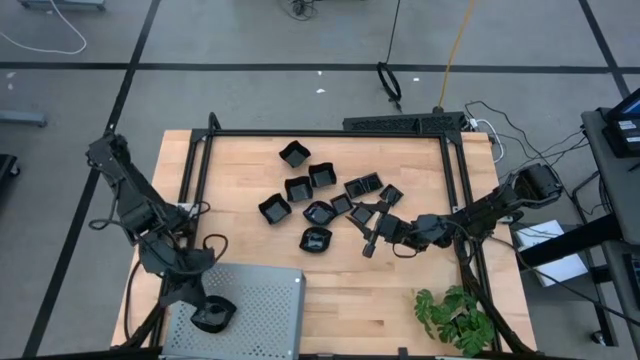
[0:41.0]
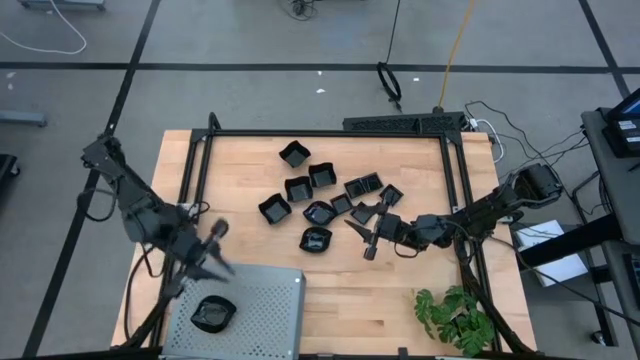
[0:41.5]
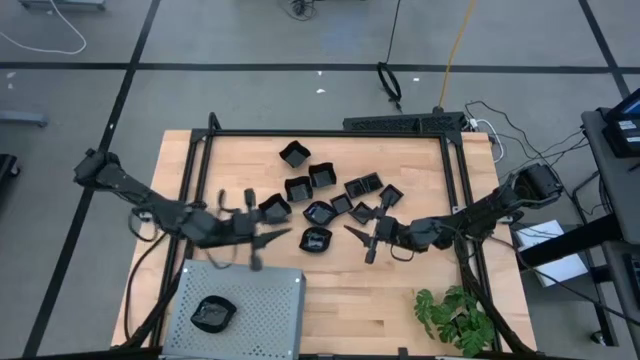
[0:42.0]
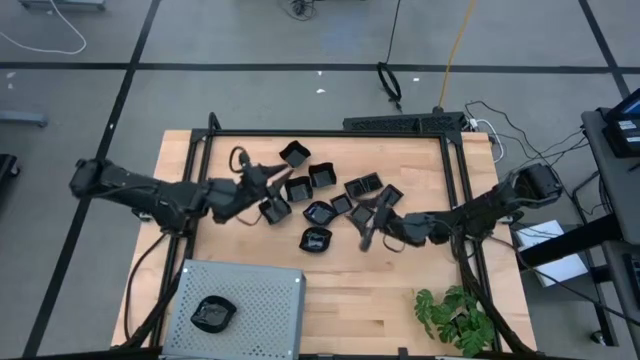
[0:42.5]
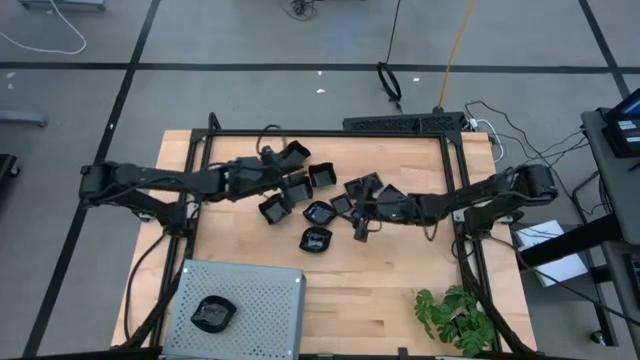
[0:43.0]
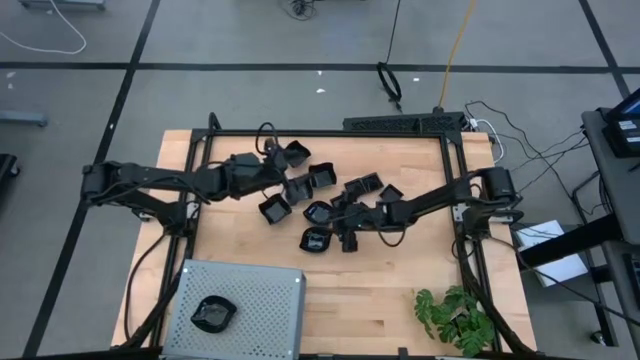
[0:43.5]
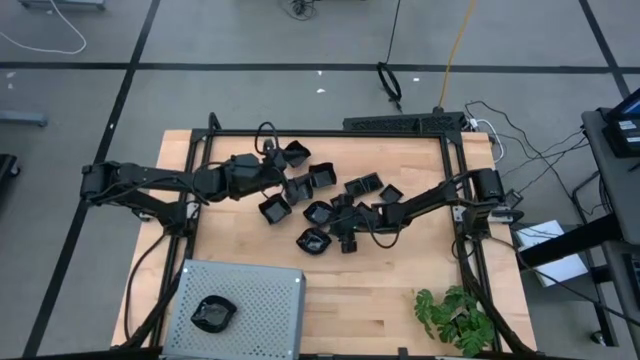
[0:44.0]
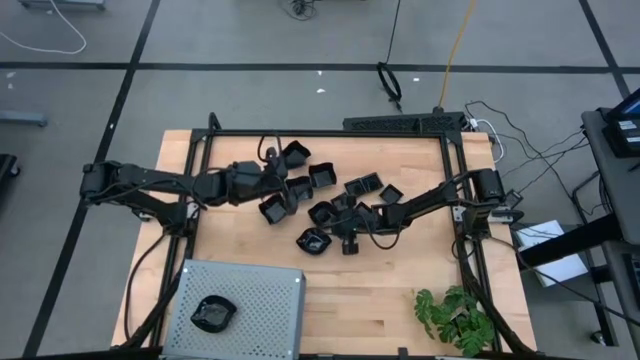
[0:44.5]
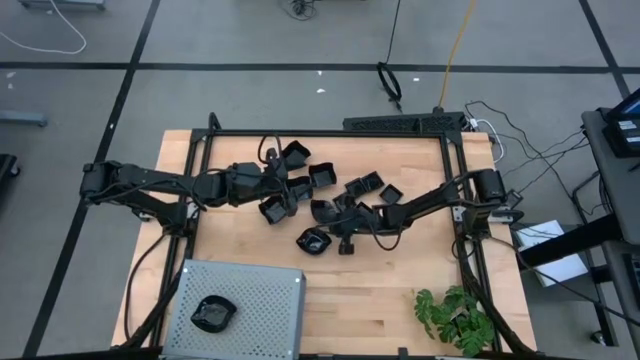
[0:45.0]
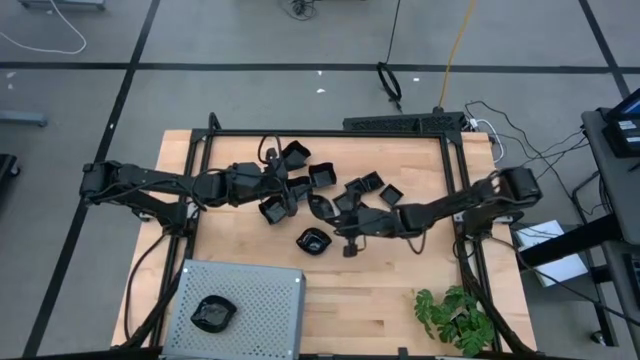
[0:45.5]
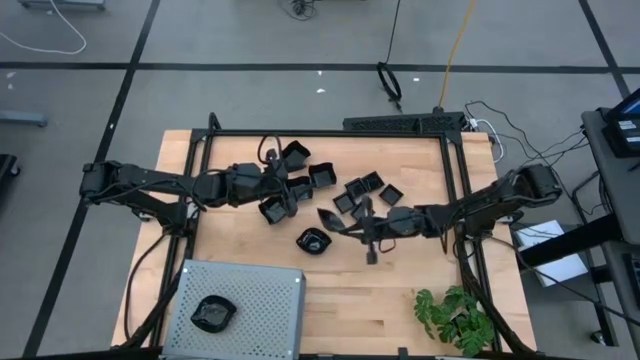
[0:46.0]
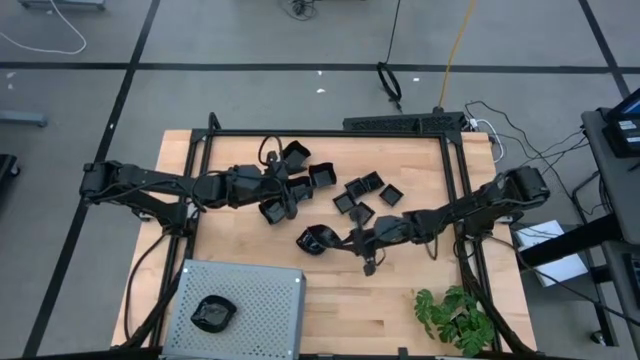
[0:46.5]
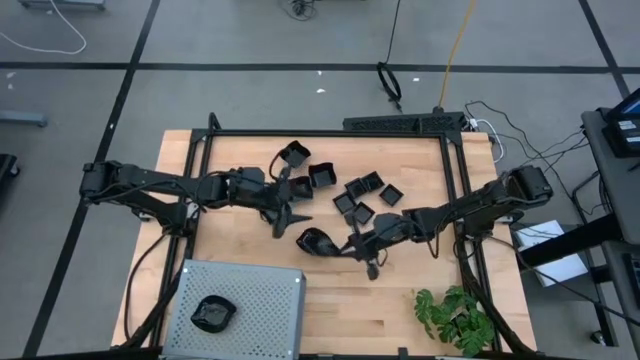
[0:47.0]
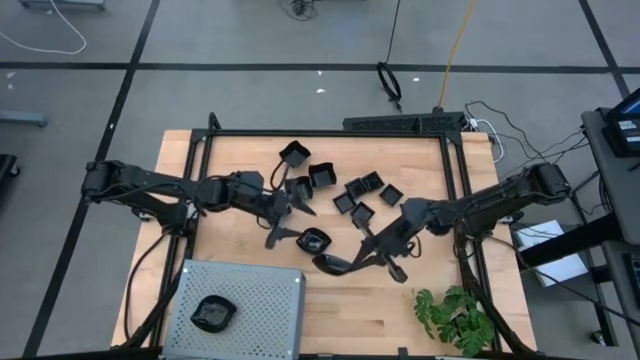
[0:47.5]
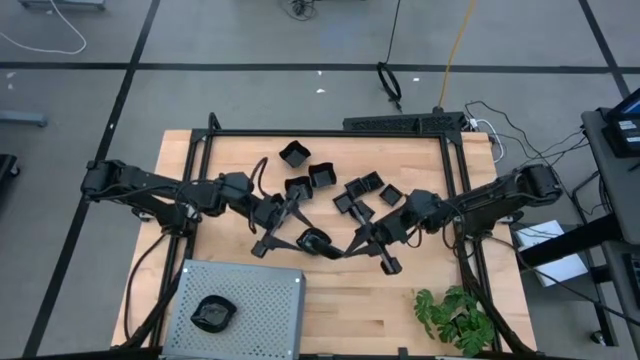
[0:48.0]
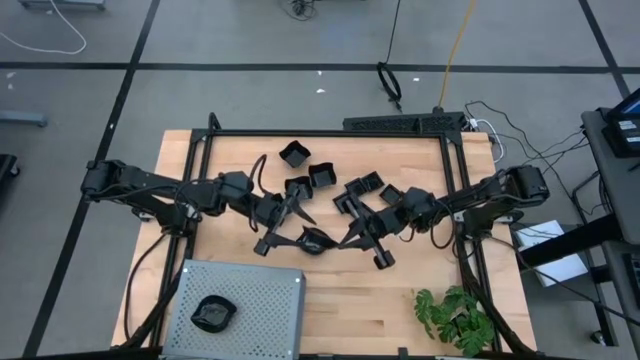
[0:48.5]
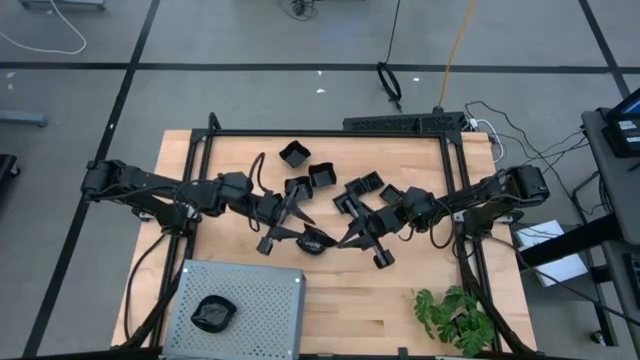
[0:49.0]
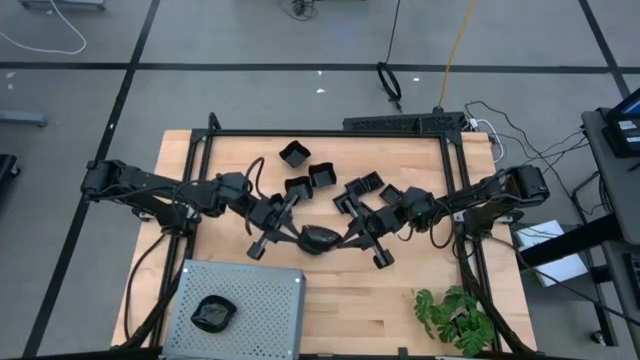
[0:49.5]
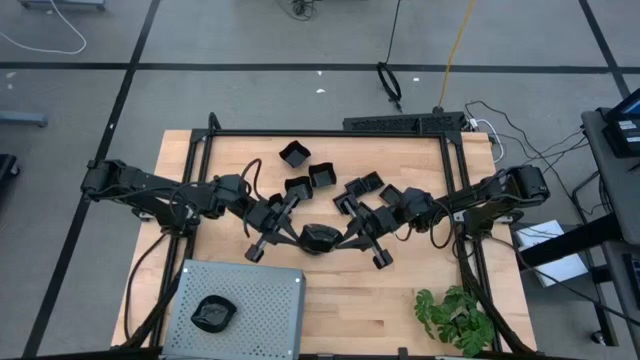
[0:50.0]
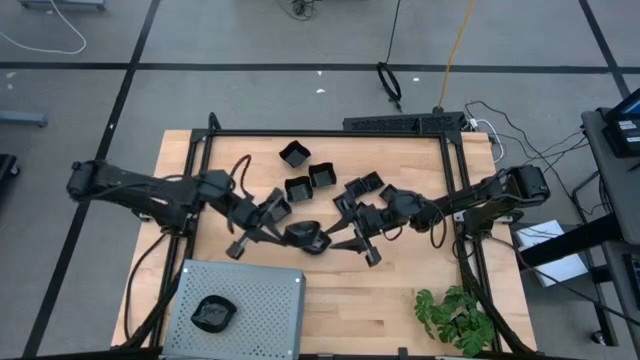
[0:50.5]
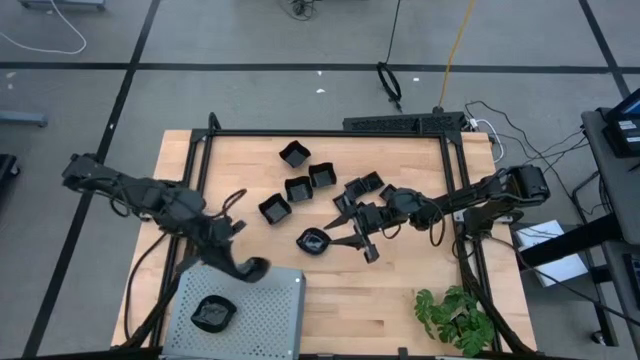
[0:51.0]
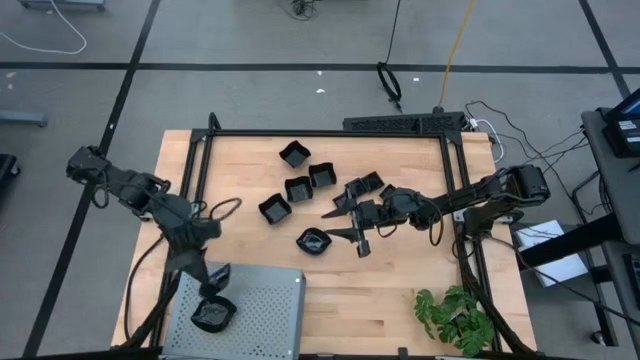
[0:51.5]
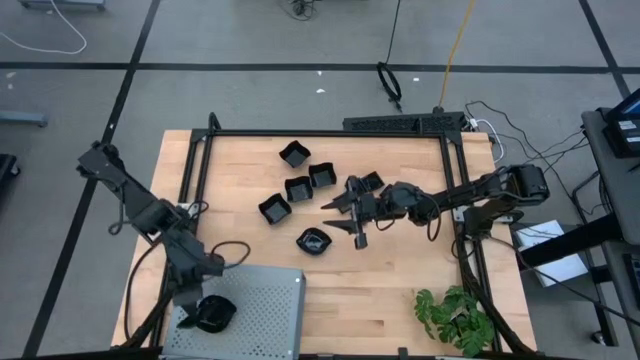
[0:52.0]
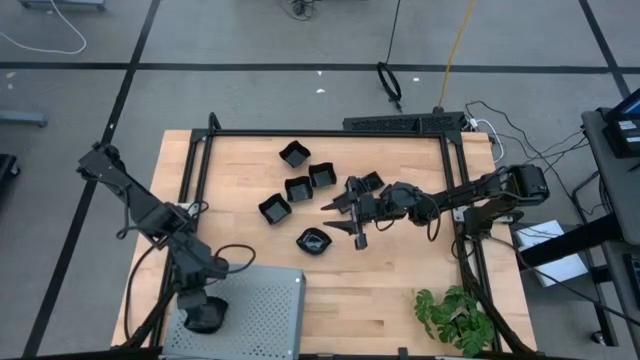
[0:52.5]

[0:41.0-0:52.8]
Task: Pick & Place Mini shaped plates
Stack the leaf-shaped plate on top of the other leaf-shaped plate on the shelf

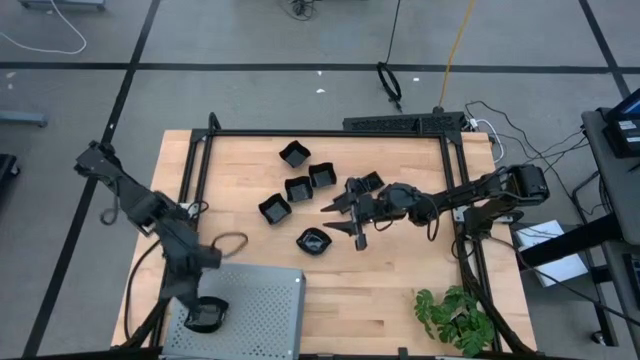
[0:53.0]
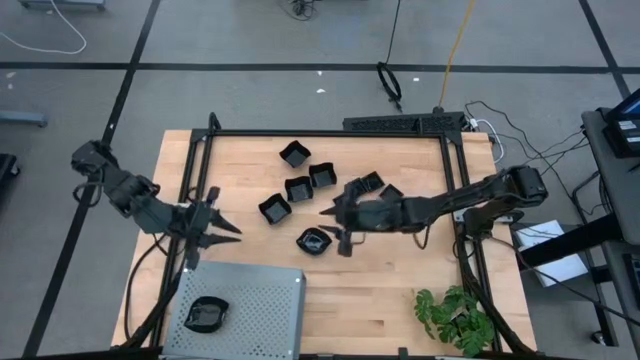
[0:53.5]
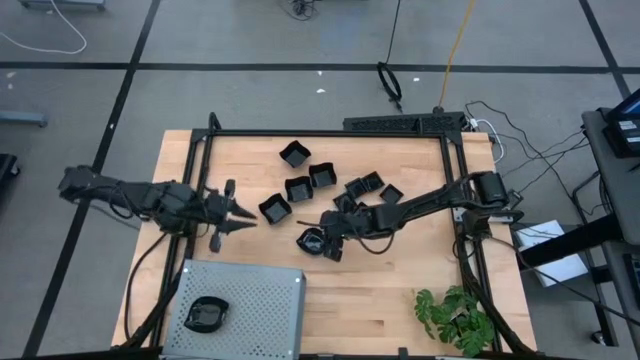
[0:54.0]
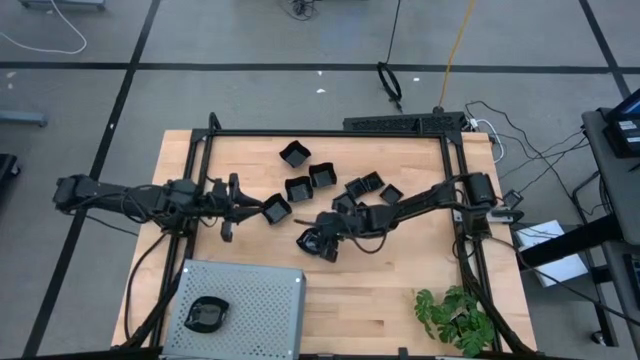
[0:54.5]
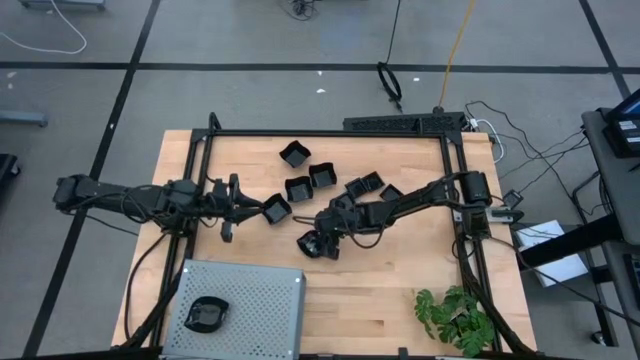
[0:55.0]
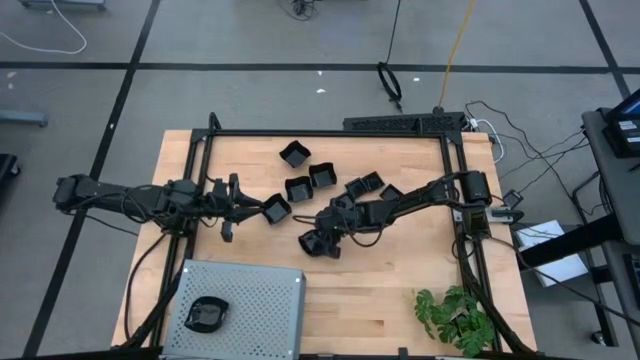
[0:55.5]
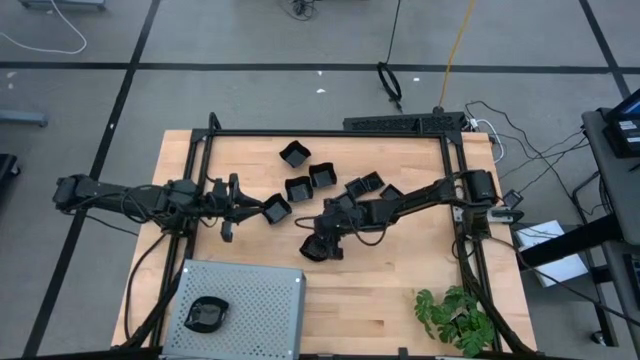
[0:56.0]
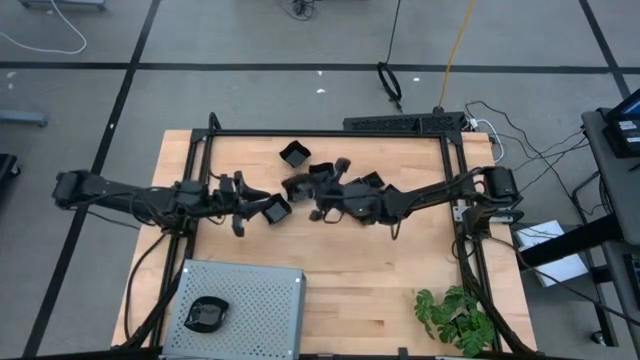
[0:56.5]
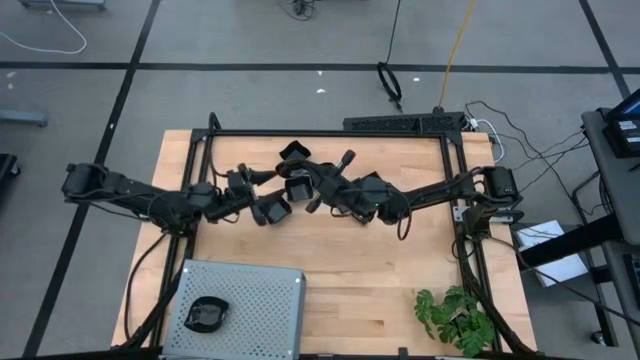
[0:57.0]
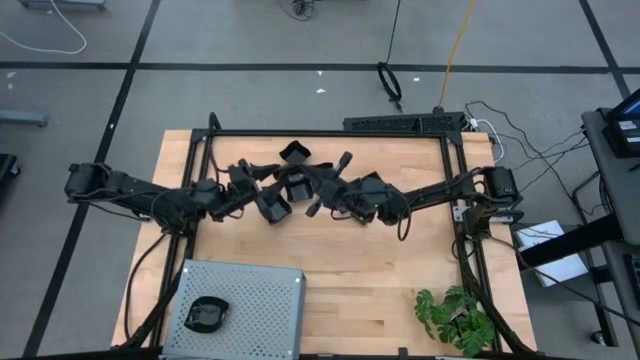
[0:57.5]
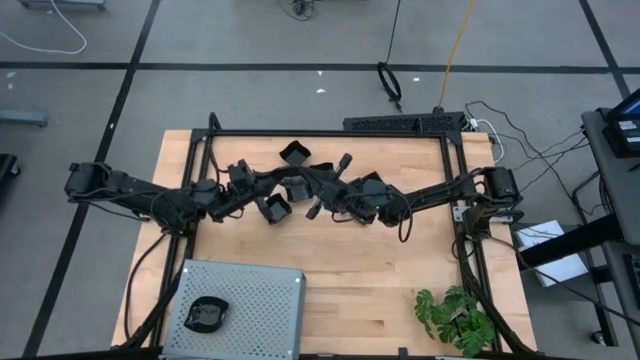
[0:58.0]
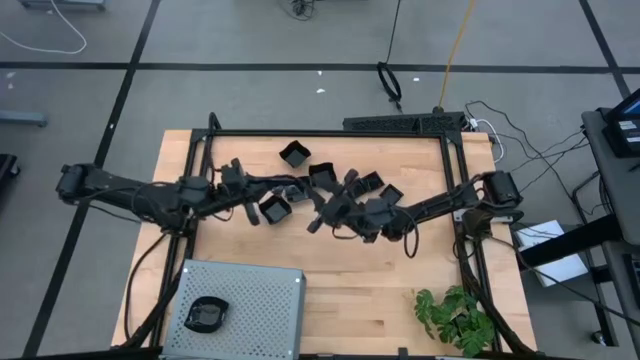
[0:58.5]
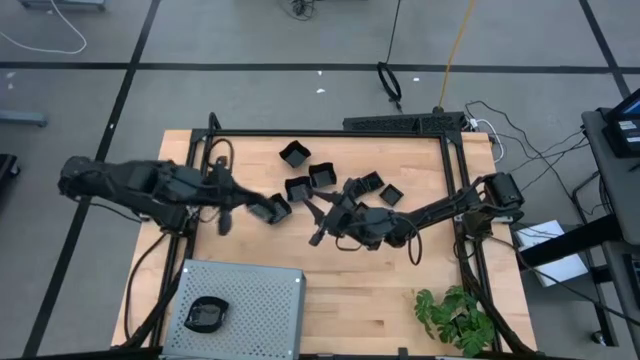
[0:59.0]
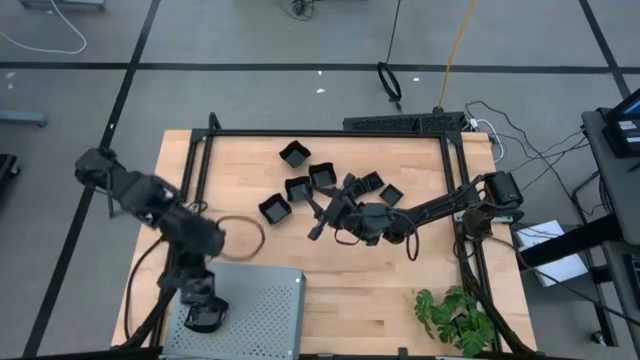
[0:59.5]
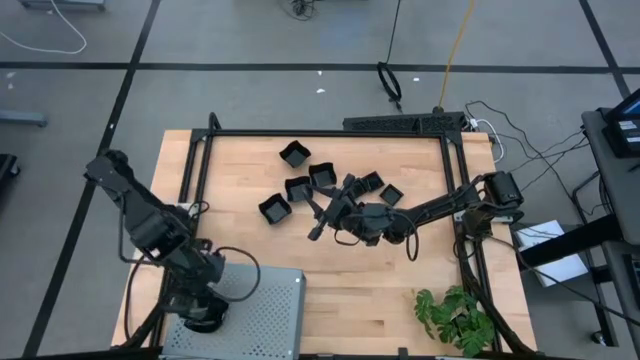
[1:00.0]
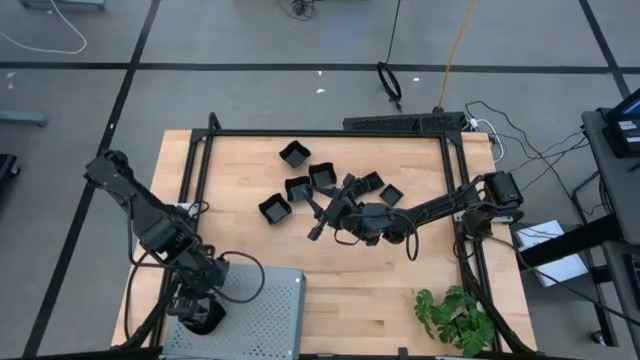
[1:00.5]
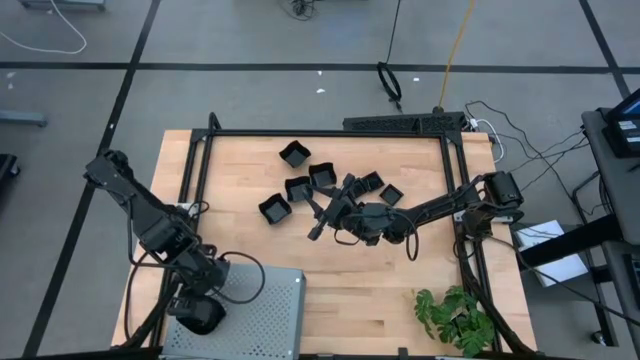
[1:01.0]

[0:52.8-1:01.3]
Stack the leaf-shaped plate on top of the other leaf-shaped plate on the shelf
